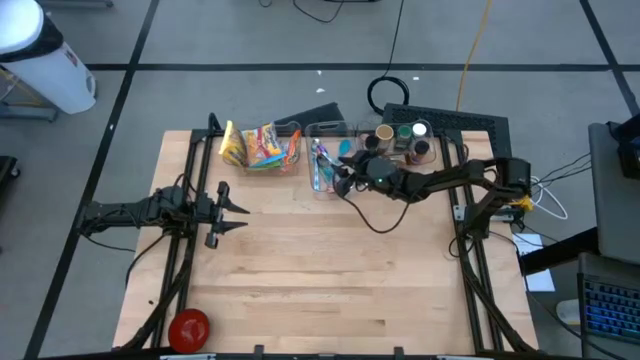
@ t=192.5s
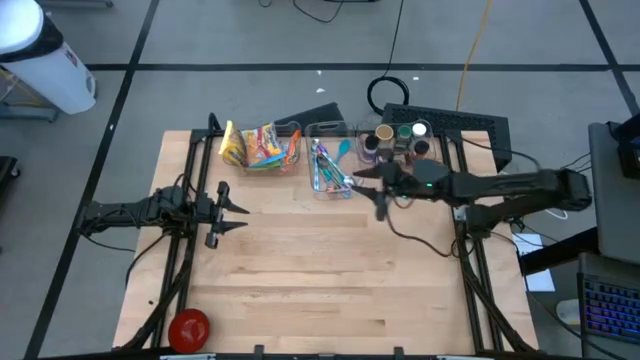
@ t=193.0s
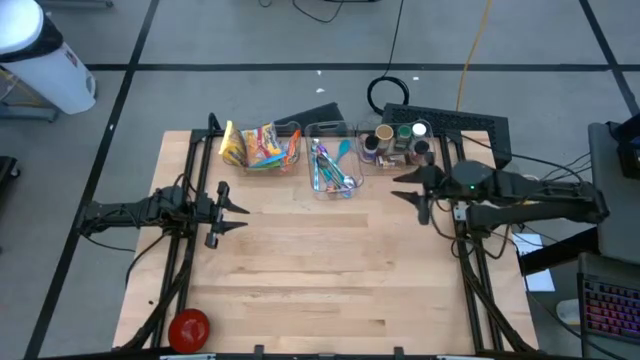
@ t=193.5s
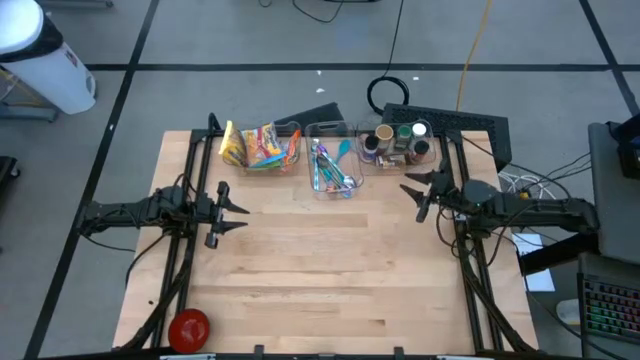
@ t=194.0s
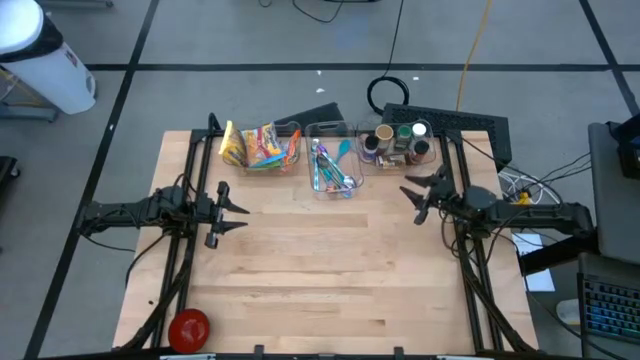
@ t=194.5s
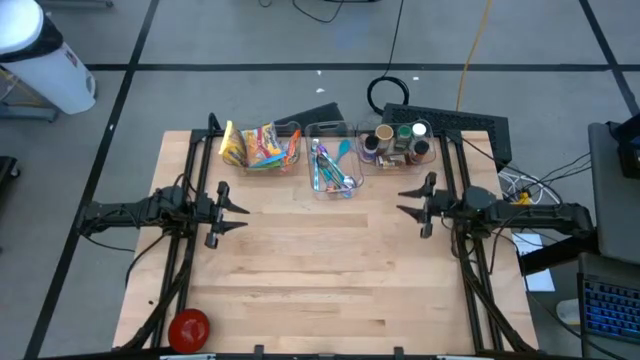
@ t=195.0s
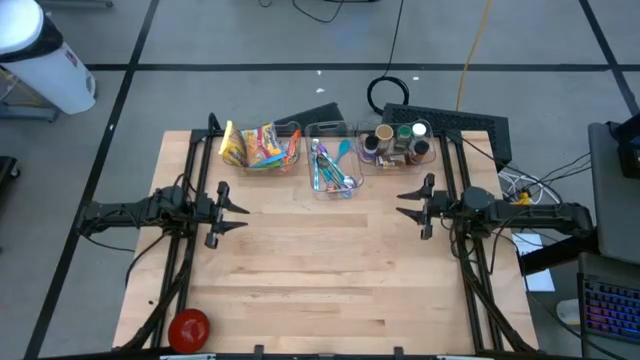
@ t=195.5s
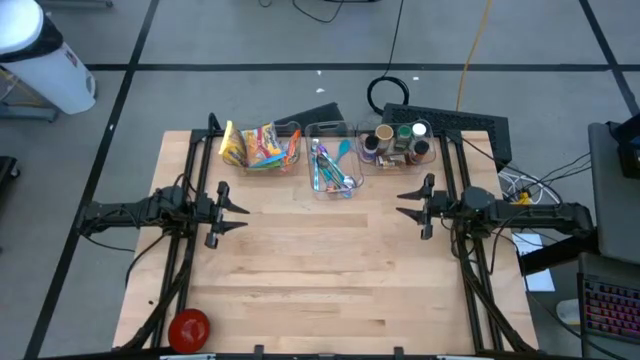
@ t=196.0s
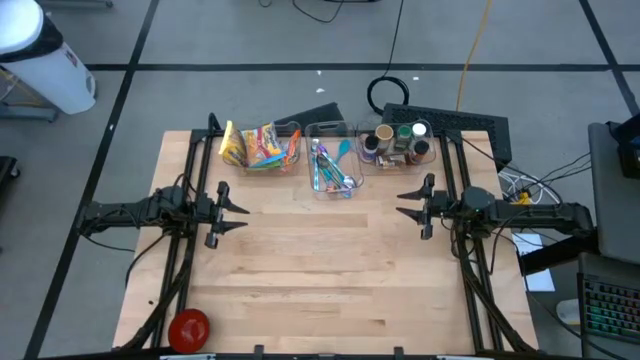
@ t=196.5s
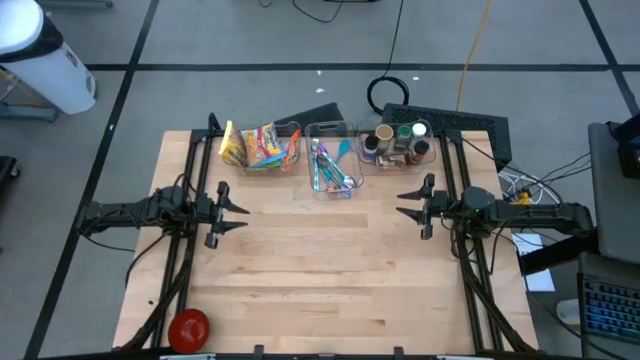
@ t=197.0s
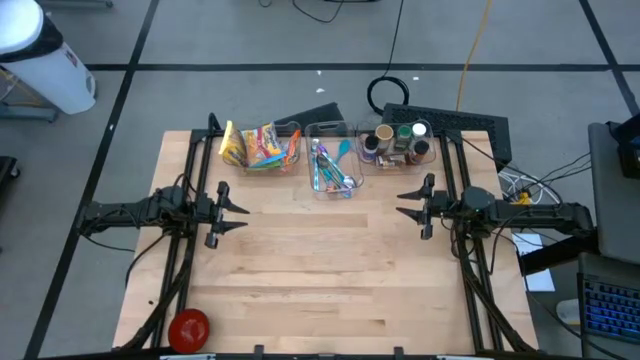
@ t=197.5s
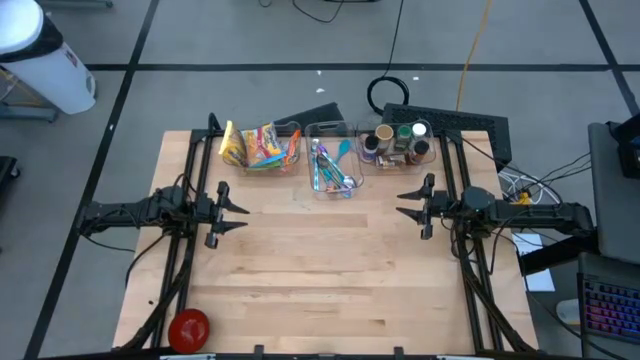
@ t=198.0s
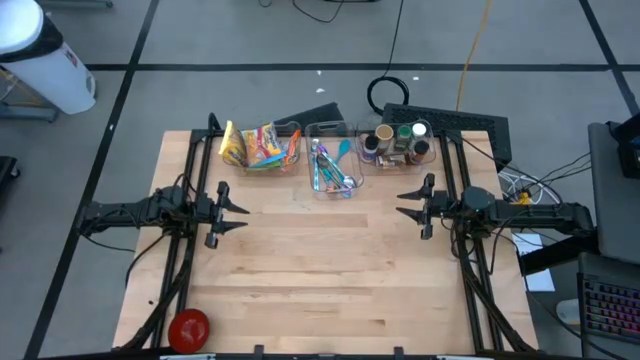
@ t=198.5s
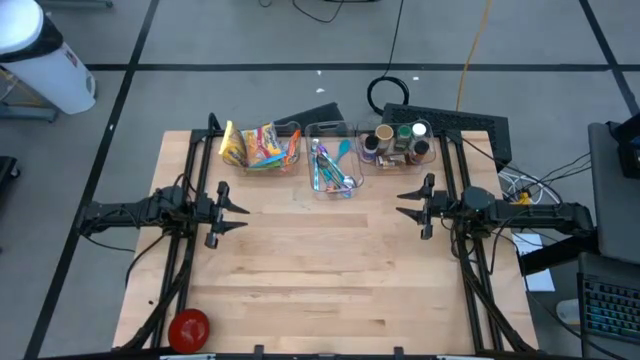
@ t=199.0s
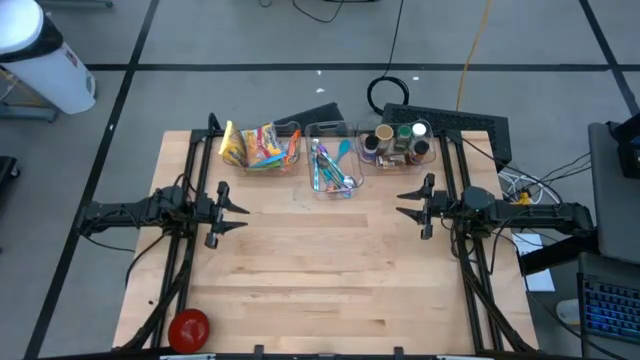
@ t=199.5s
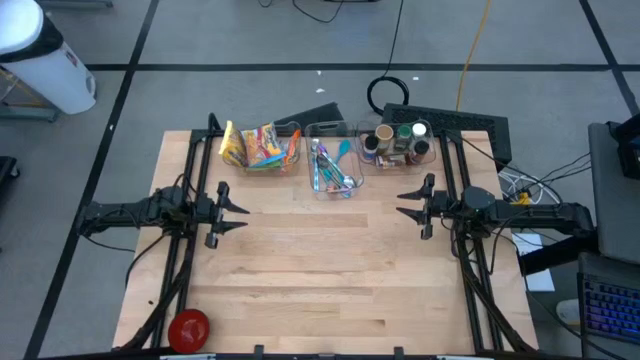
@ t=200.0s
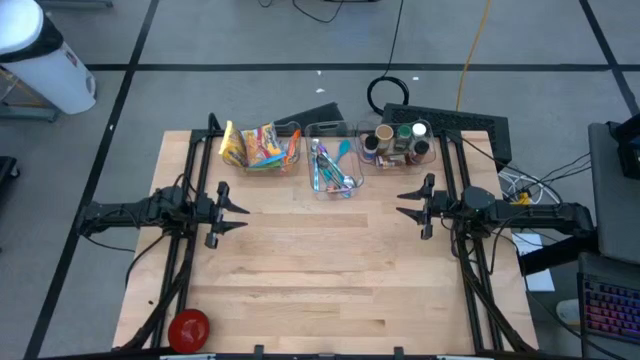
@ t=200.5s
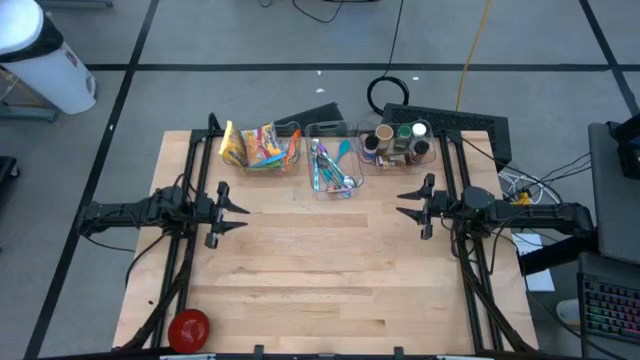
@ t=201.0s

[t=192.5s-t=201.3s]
Task: Pick & Place Food Item
Return to Home Position

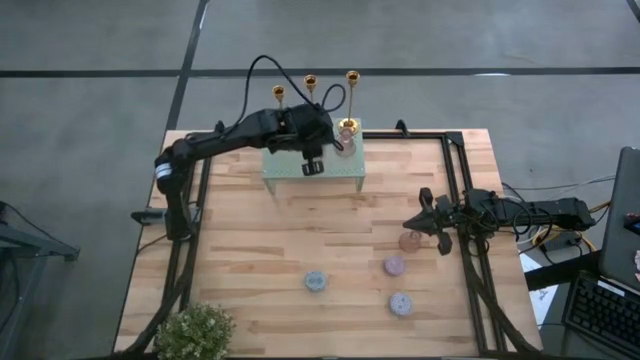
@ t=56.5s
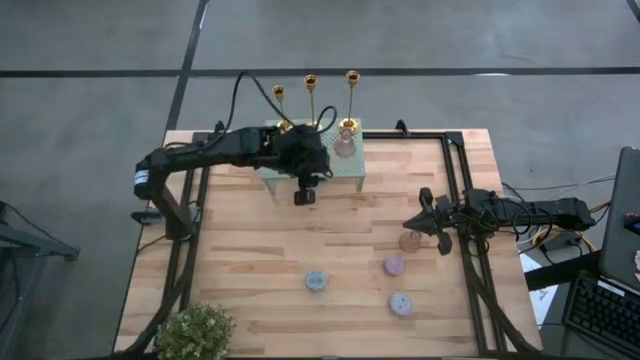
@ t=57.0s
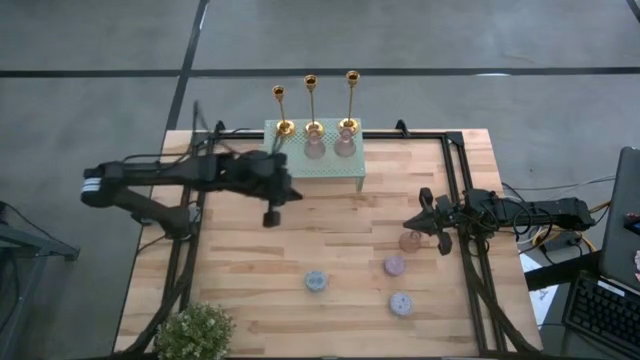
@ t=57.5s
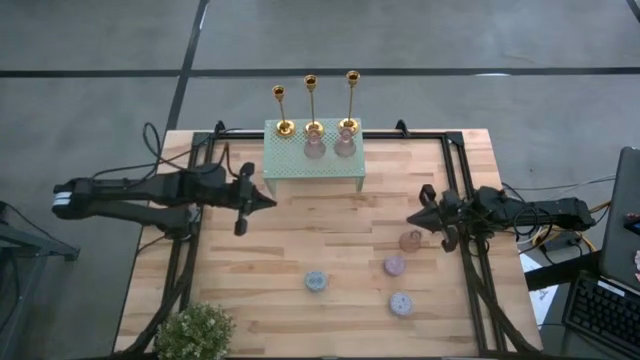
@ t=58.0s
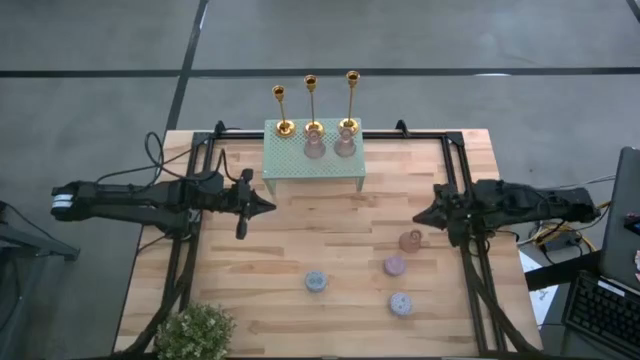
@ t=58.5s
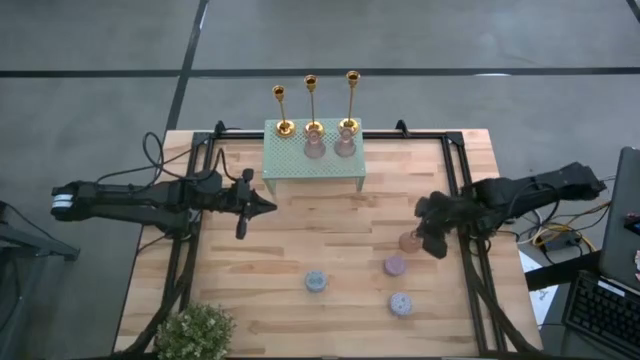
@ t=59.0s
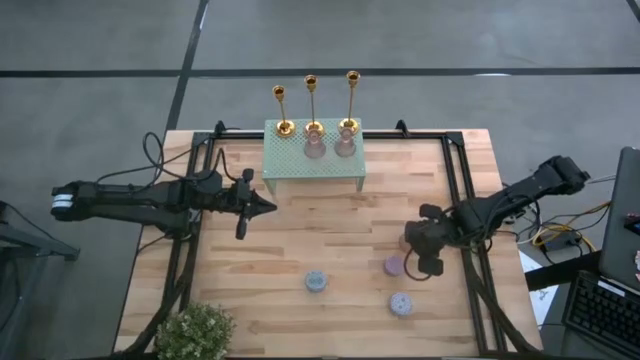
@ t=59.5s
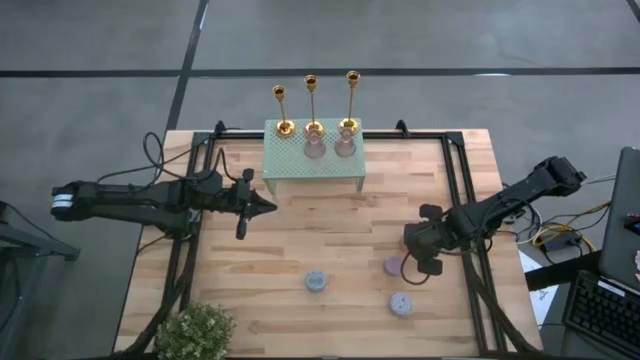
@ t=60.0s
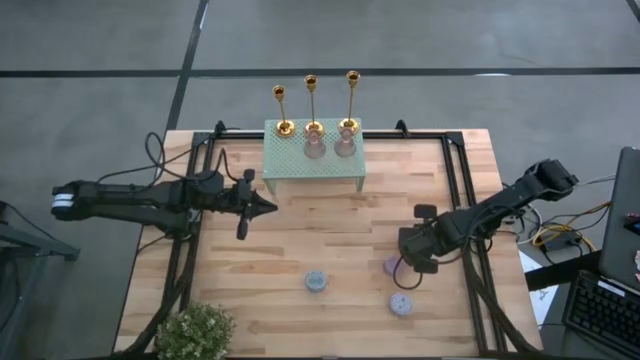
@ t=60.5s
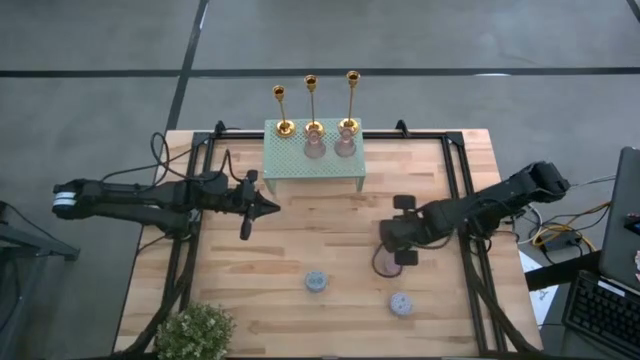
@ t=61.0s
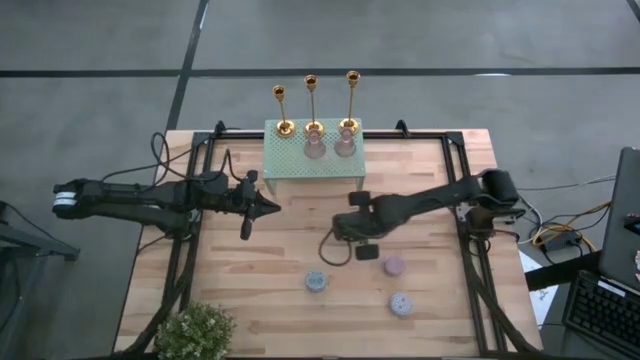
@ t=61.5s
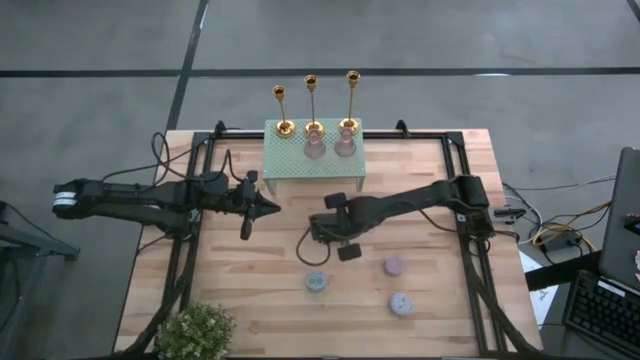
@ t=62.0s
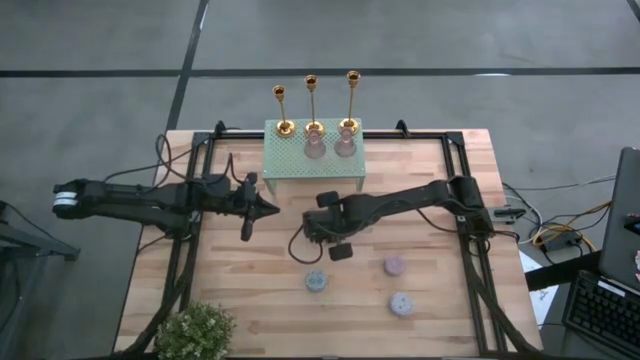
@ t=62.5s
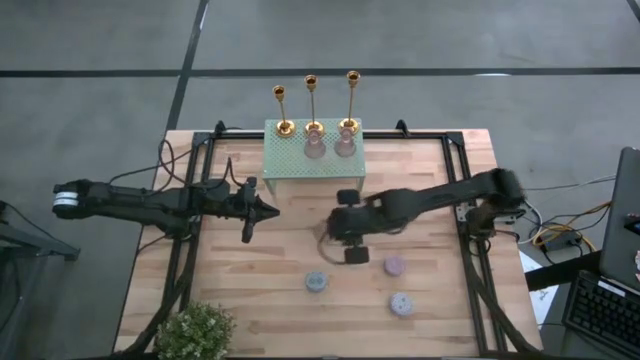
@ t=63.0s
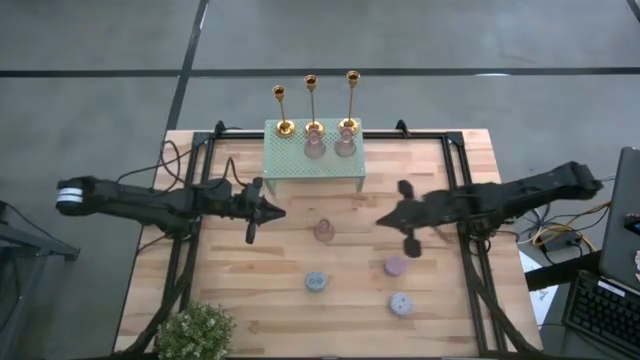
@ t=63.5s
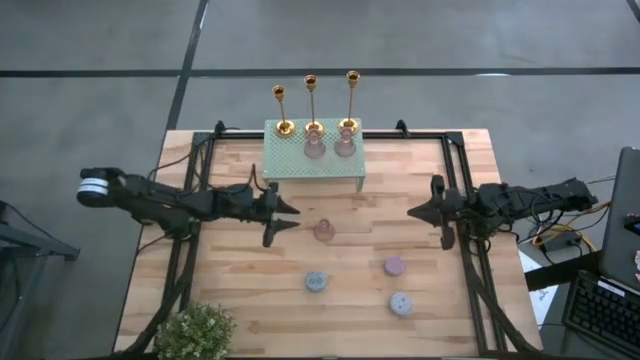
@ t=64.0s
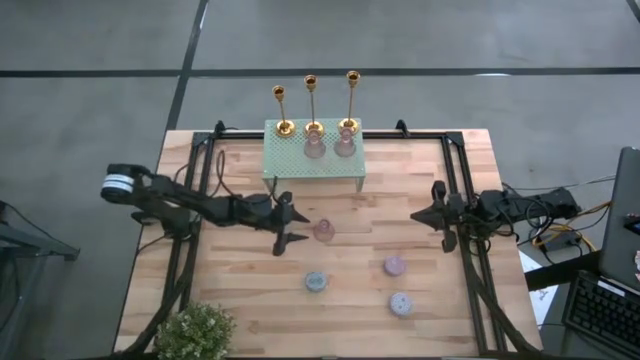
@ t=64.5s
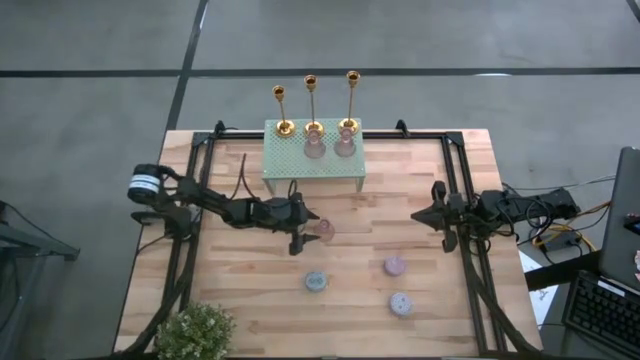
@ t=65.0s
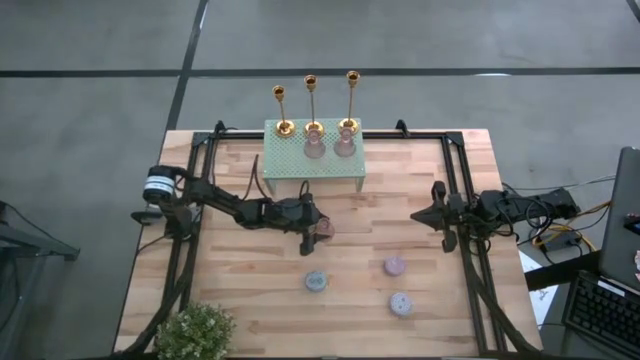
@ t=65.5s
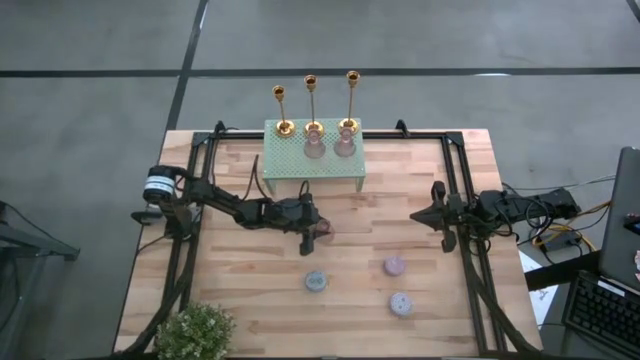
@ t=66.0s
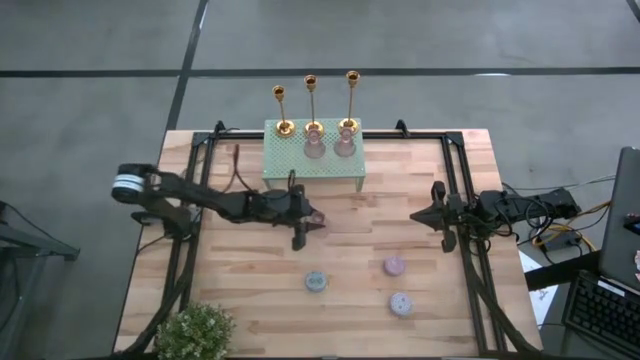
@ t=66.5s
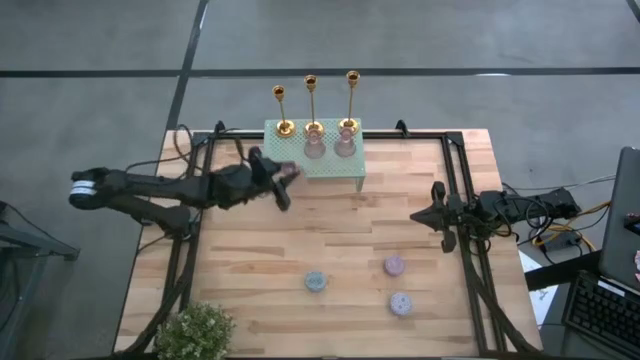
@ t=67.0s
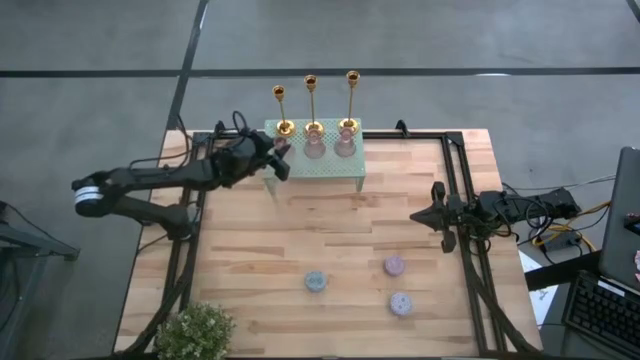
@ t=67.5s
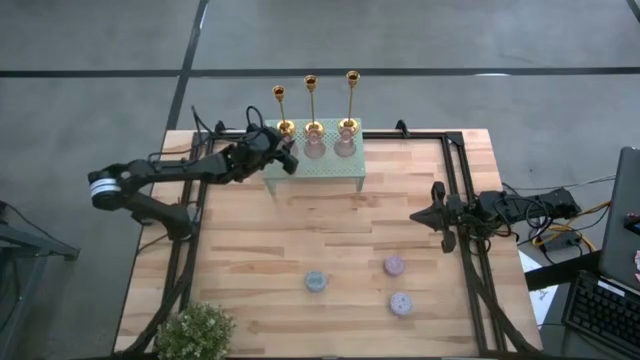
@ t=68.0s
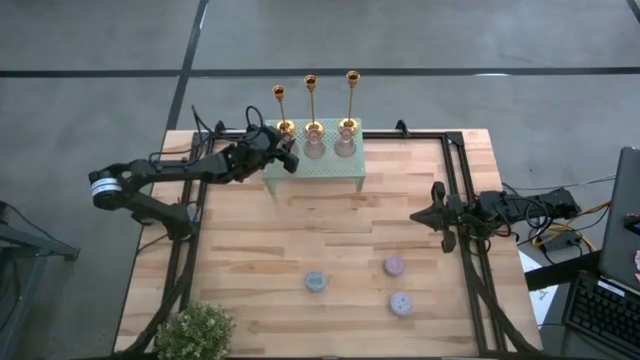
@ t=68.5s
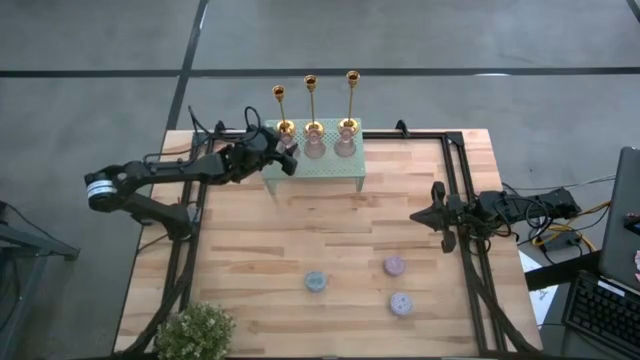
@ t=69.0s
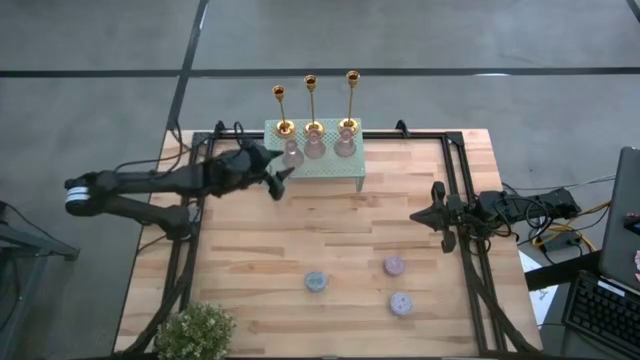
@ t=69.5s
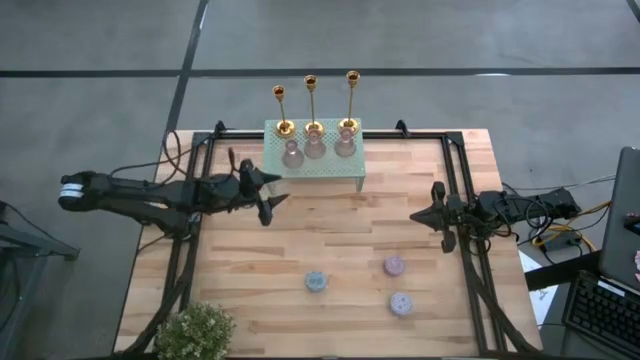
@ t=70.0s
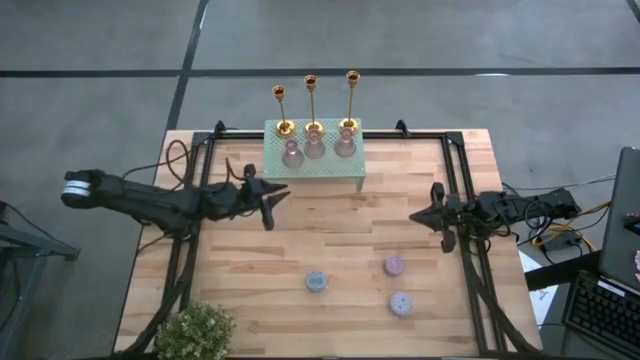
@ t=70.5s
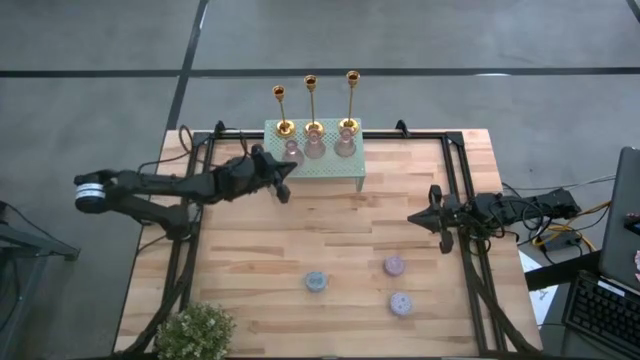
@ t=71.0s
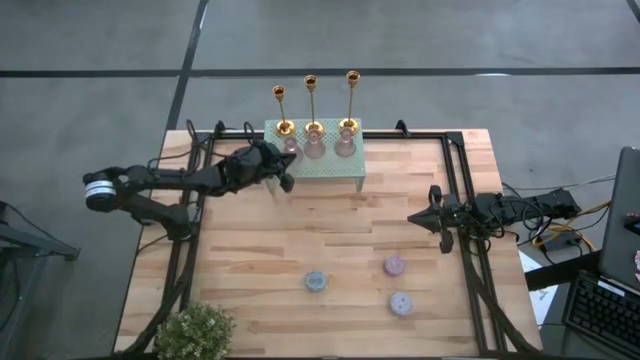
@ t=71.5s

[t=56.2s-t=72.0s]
Task: Pick & Place candle stick holders
Put the pink candle holder on the shelf aligned with the other pink candle holders
